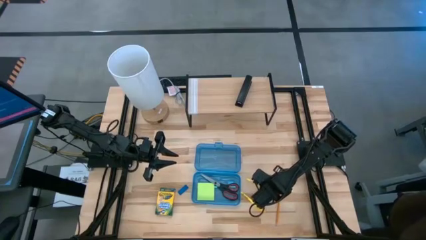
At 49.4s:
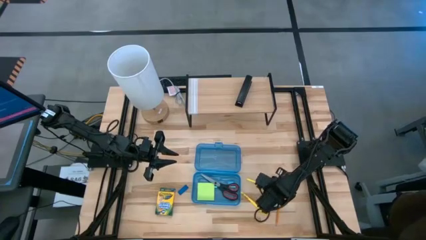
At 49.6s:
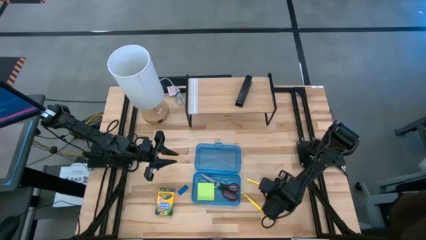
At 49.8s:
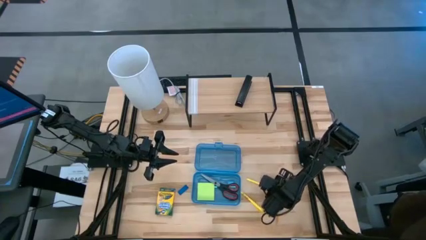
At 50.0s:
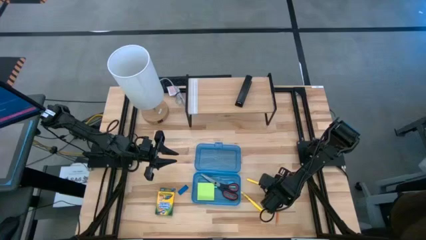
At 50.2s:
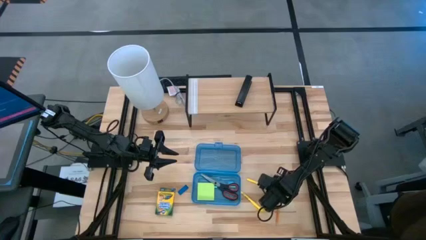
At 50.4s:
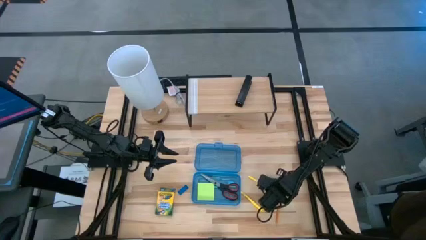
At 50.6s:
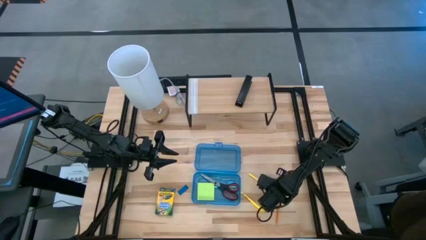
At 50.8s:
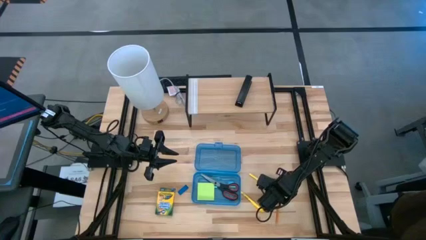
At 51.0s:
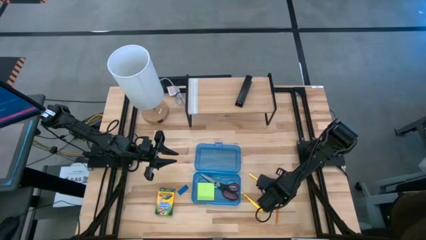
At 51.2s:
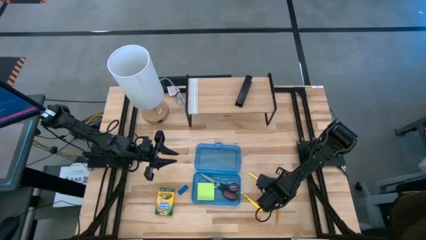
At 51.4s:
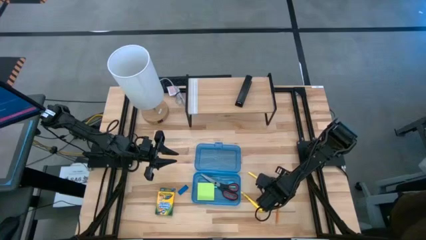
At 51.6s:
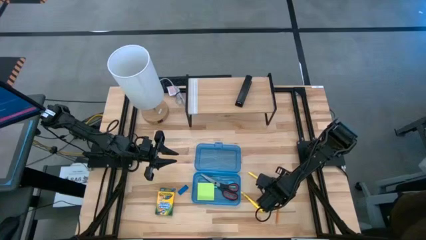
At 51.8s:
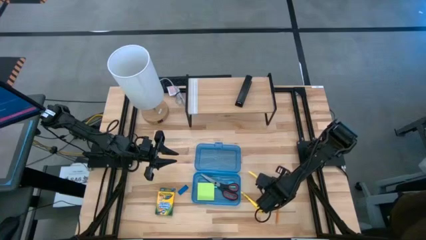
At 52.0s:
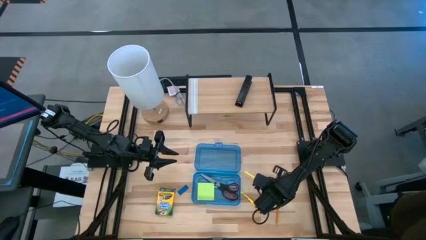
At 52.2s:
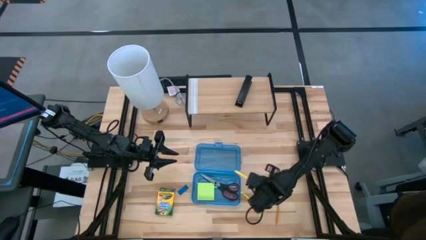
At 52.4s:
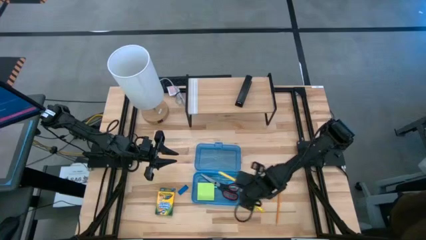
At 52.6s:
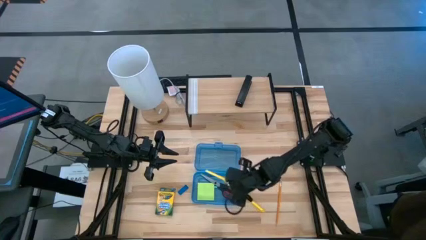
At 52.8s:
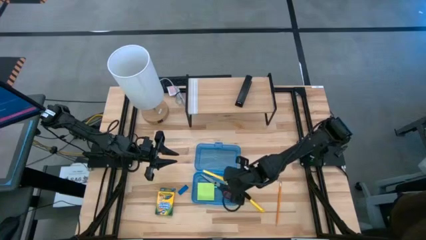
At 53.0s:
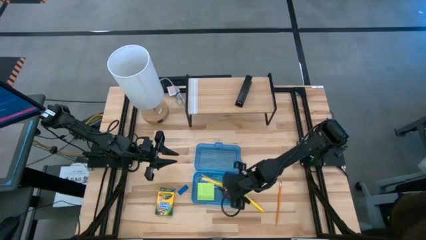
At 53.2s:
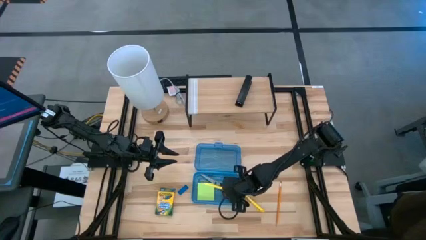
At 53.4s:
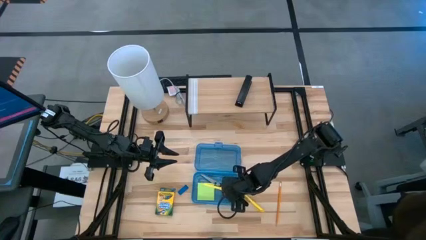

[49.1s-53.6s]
Task: Pack school essentials
Put the right yellow pen into the blue supply box

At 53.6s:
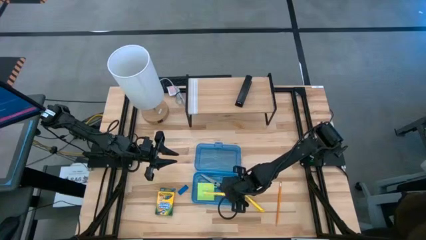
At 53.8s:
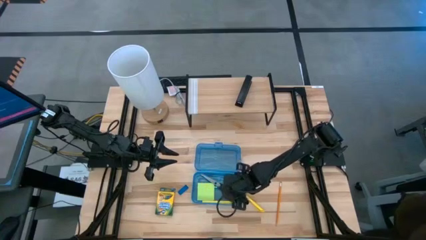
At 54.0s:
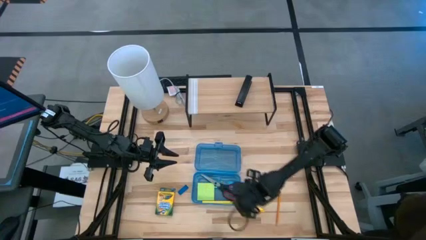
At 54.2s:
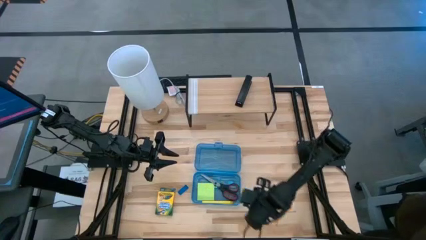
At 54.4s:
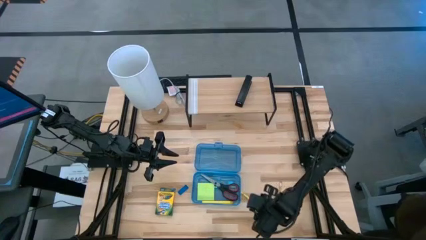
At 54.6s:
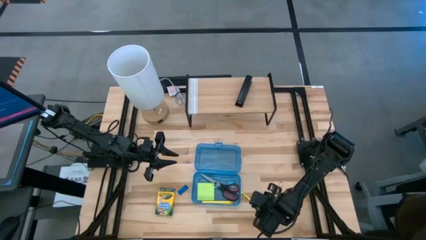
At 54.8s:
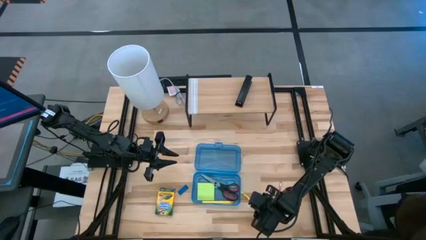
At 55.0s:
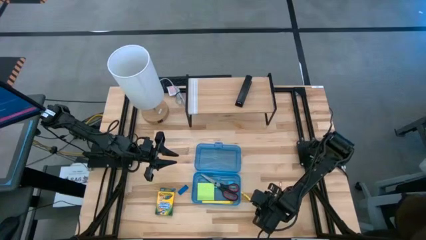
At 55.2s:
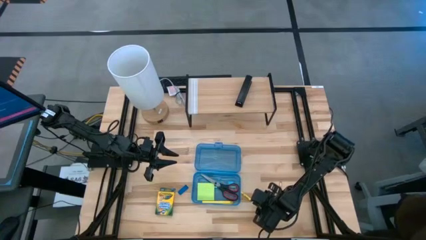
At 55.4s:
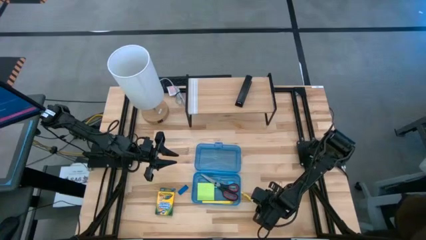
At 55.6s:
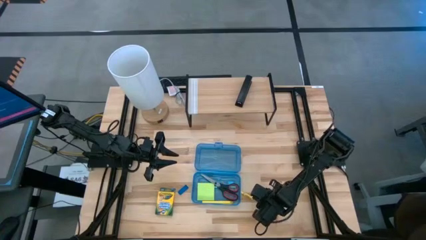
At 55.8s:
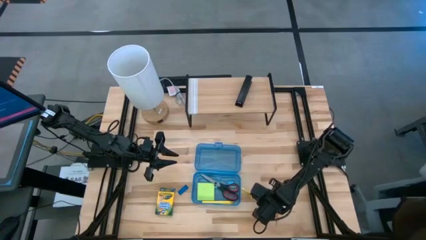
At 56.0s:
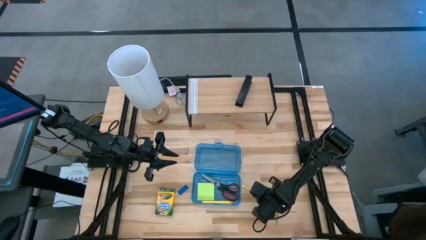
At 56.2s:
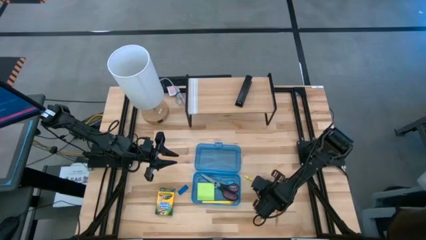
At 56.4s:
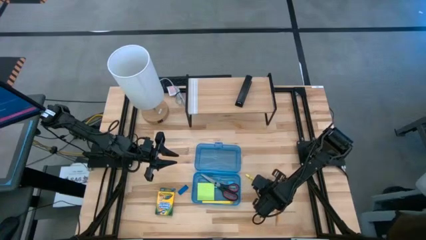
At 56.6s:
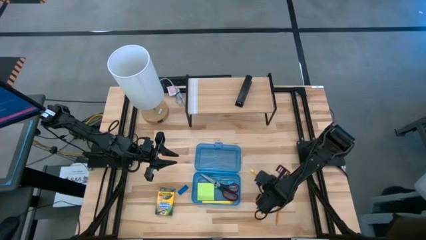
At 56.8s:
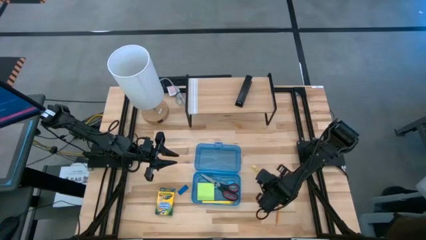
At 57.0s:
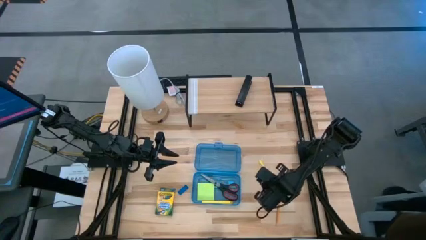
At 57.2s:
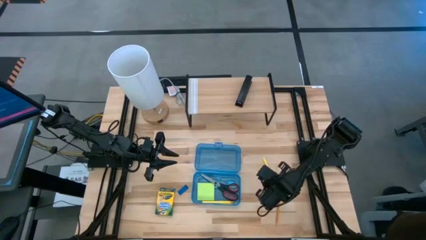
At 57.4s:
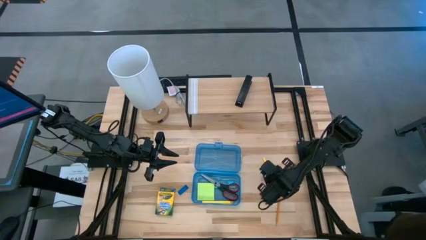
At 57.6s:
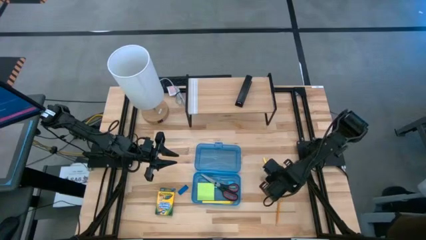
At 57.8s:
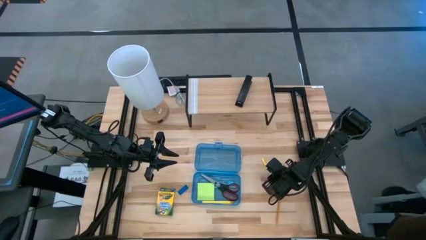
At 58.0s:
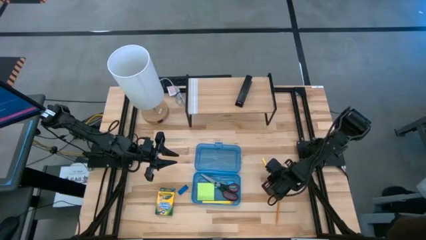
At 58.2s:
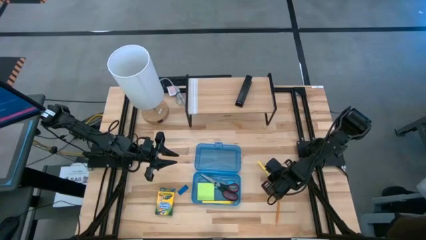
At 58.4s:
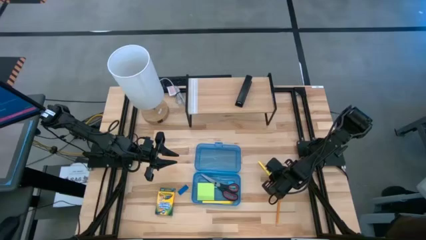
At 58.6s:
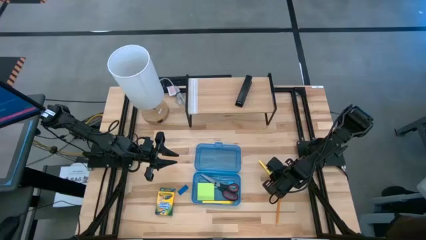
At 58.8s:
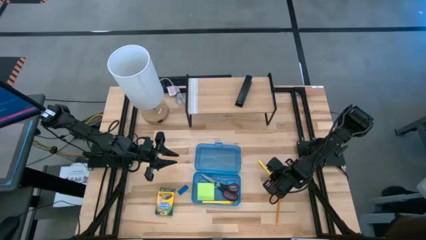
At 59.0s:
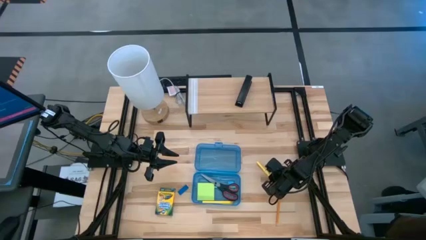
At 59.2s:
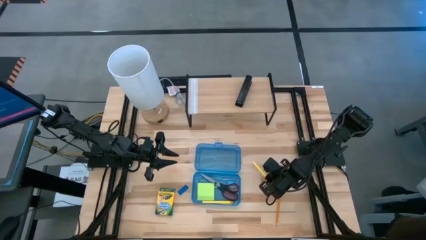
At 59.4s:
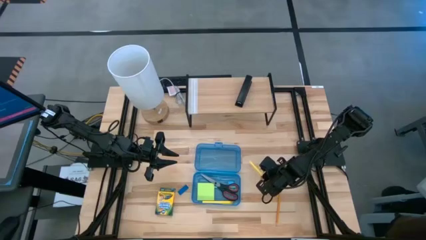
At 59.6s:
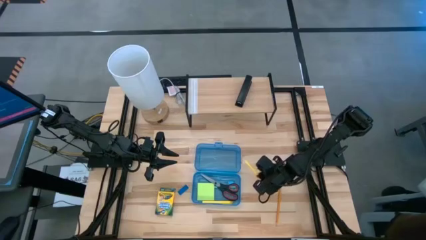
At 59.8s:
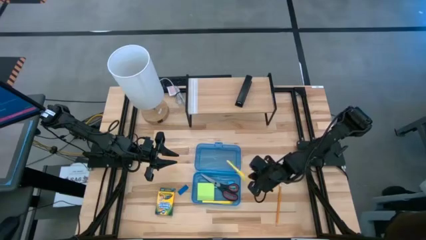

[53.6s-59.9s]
Put the yellow pen into the blue supply box

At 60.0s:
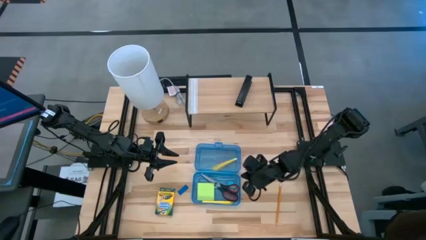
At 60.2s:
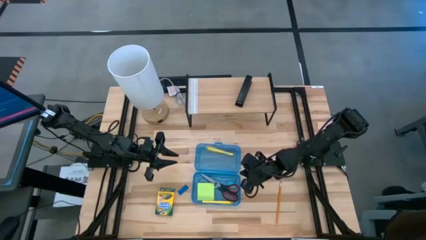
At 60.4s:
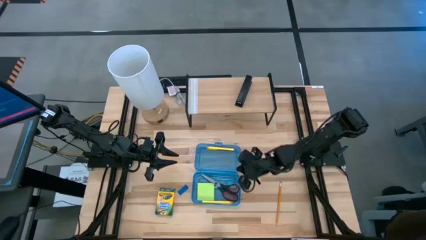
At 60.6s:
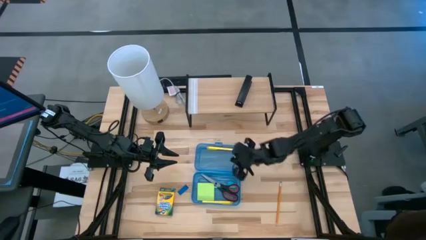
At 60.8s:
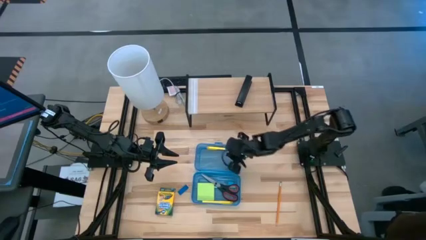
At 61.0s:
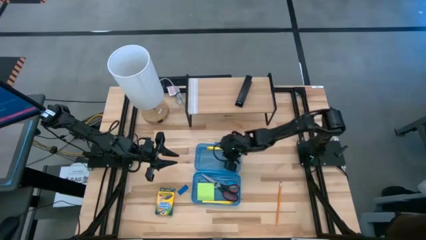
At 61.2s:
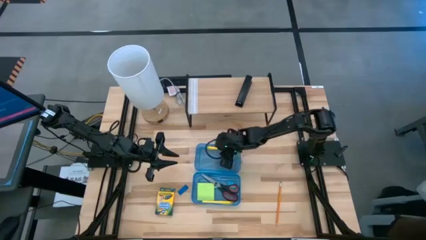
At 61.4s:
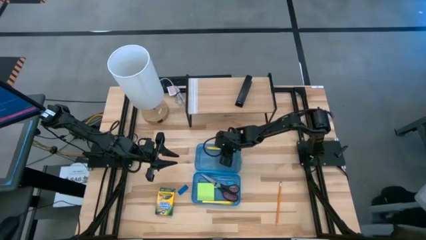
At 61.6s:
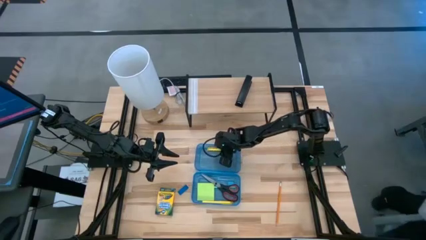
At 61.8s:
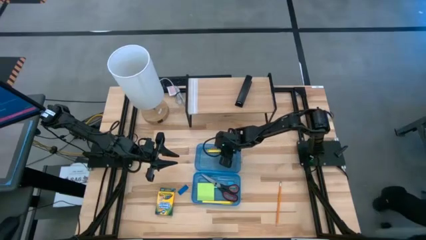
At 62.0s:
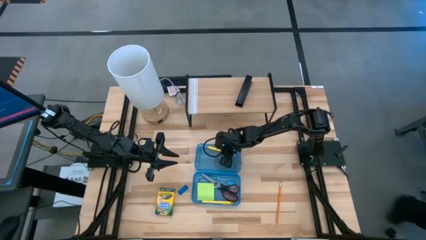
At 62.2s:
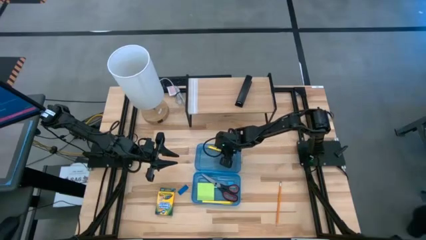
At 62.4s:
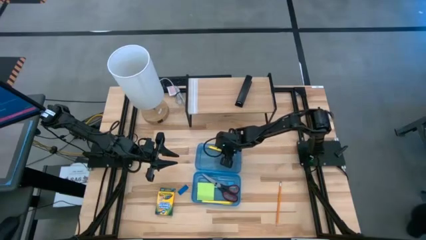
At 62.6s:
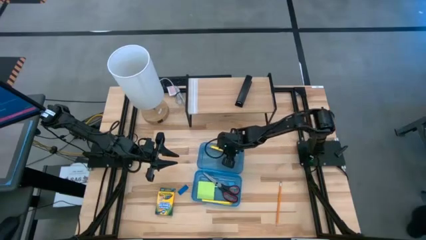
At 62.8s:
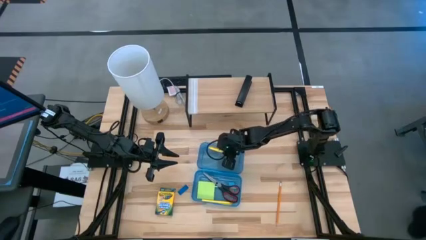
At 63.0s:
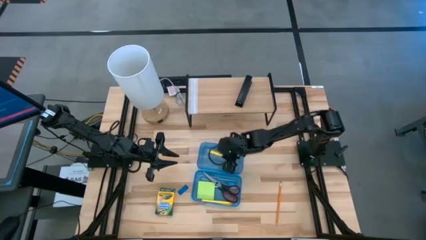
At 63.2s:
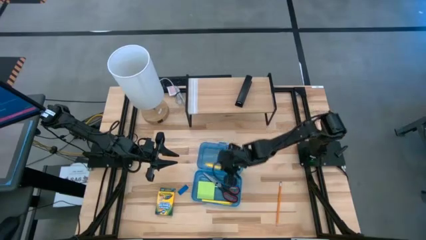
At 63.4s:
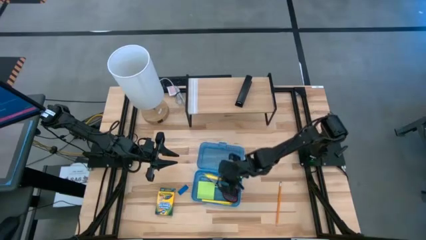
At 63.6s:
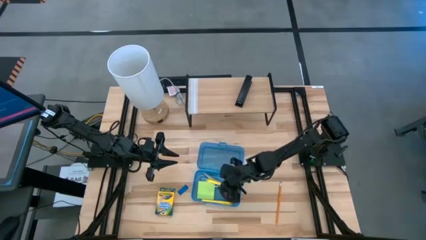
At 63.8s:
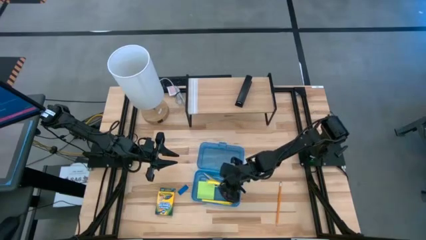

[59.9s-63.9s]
Put the yellow pen into the blue supply box

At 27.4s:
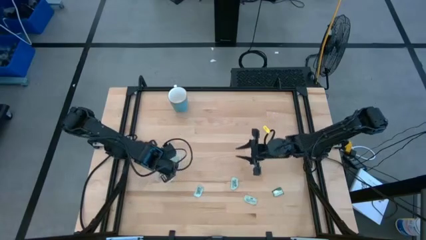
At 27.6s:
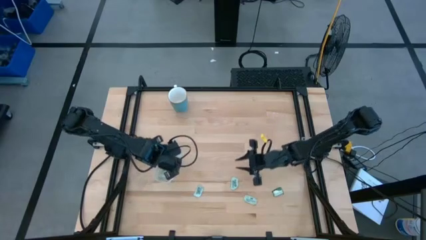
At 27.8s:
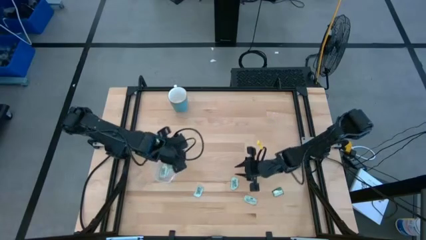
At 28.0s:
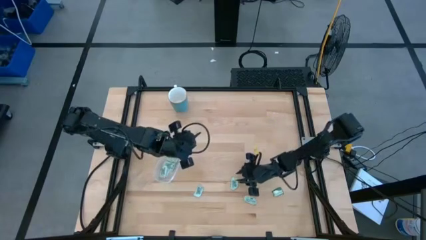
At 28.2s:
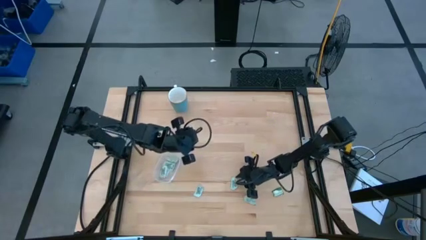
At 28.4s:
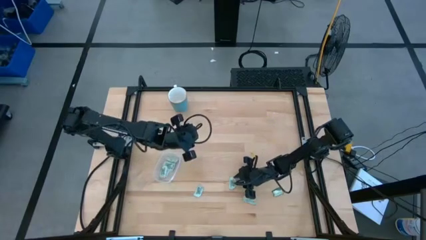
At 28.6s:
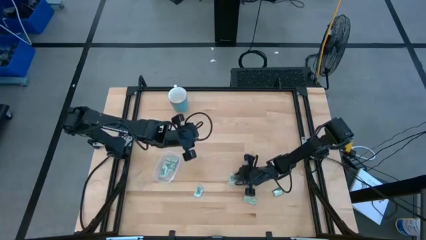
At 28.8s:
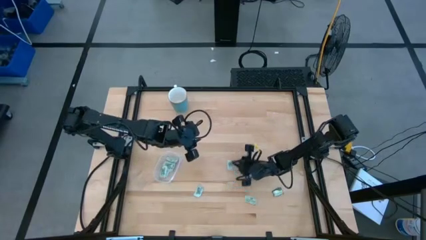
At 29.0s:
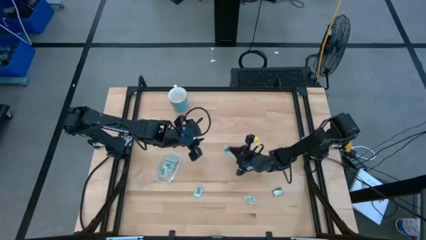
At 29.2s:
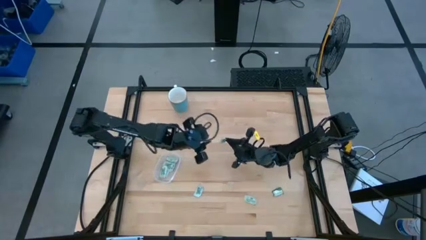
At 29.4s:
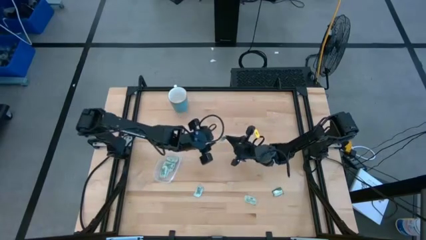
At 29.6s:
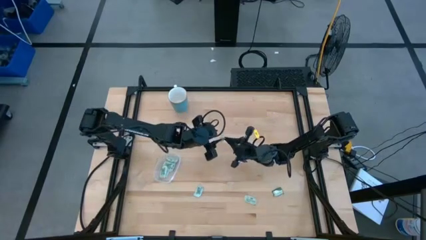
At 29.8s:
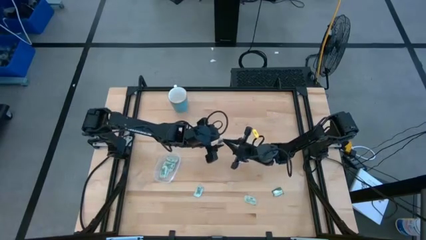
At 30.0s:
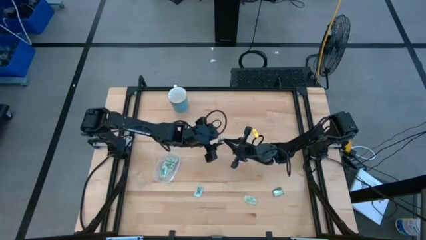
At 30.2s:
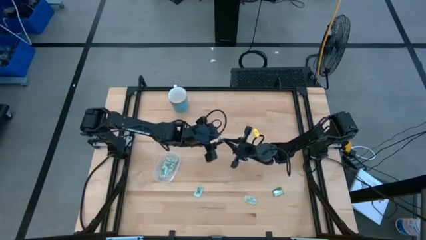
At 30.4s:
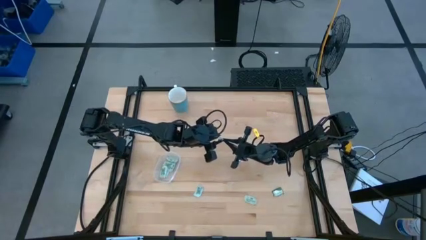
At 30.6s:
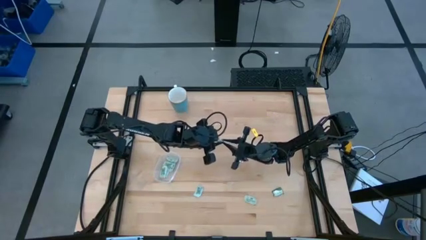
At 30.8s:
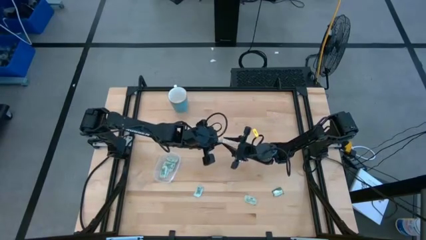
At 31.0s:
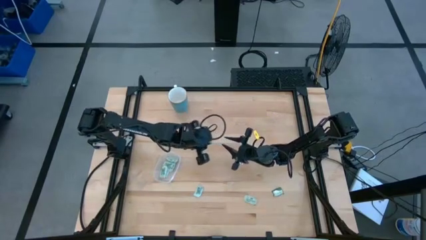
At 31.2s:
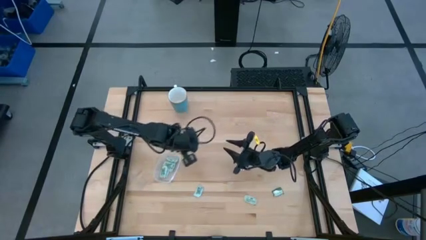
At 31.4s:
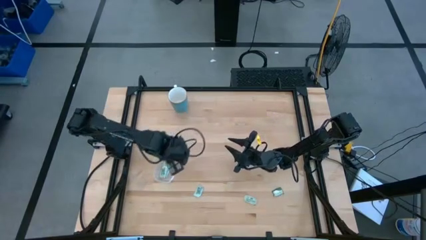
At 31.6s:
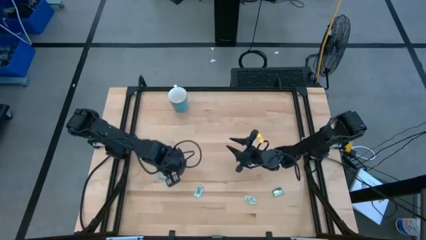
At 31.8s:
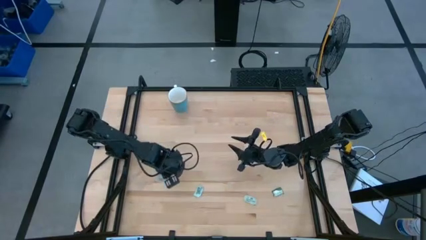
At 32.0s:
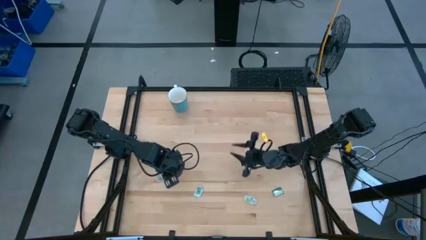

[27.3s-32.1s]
Task: Pick and place Stevia / Truvia into bins
Put the stevia packet into the transparent container
